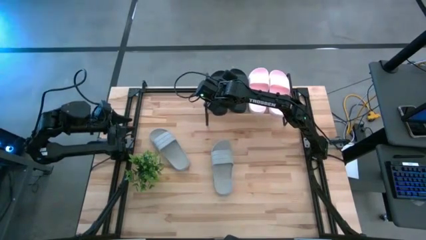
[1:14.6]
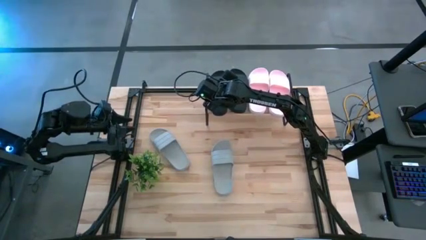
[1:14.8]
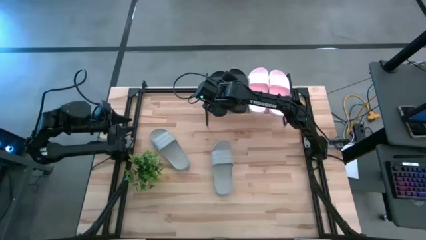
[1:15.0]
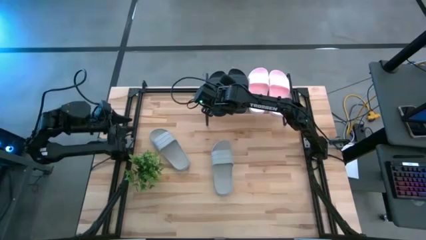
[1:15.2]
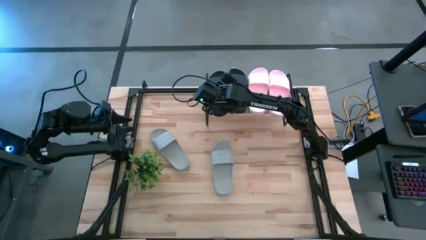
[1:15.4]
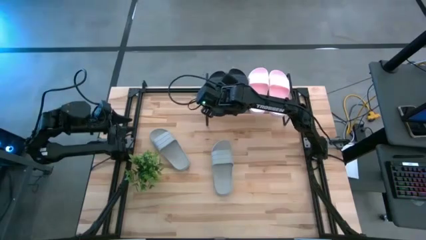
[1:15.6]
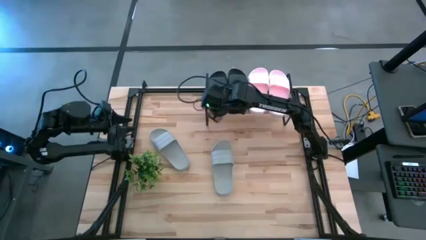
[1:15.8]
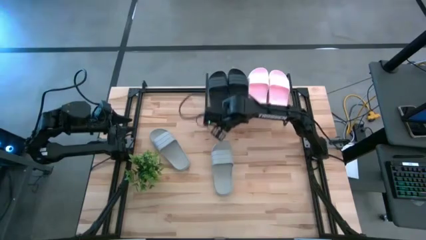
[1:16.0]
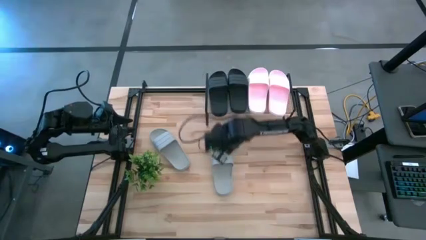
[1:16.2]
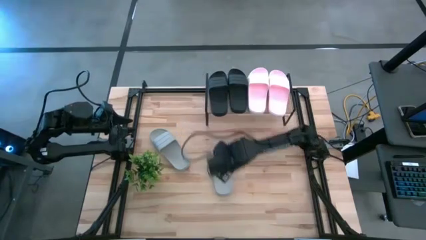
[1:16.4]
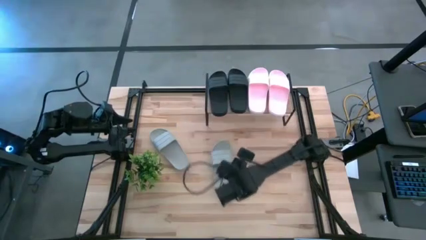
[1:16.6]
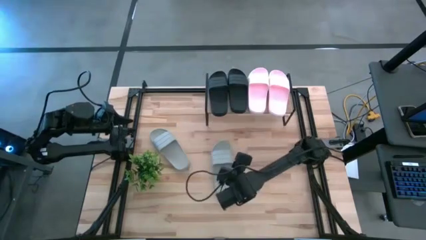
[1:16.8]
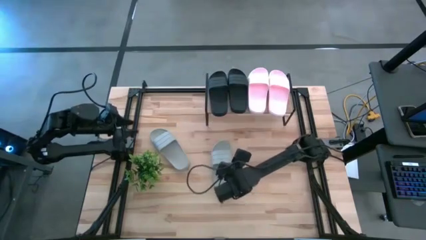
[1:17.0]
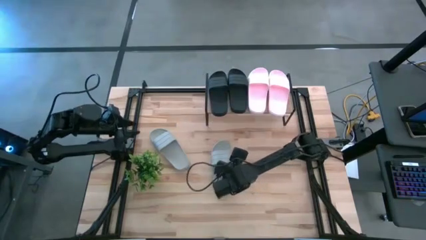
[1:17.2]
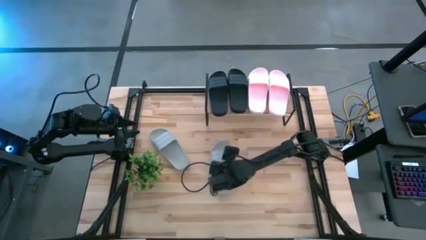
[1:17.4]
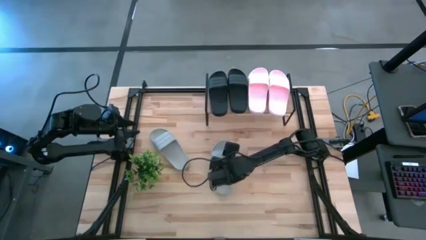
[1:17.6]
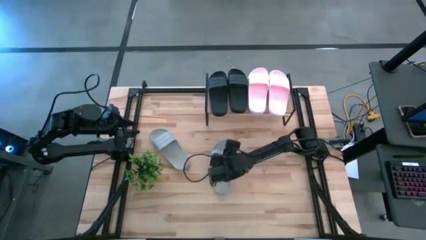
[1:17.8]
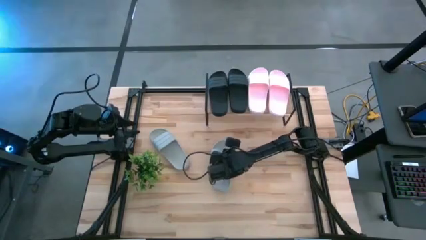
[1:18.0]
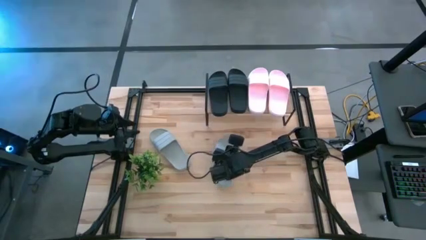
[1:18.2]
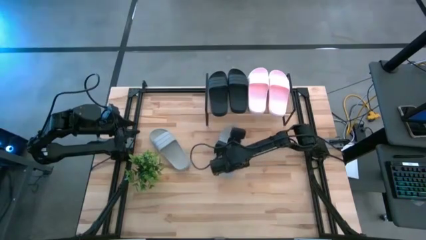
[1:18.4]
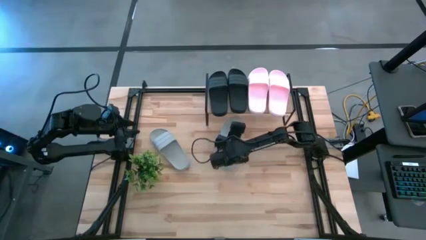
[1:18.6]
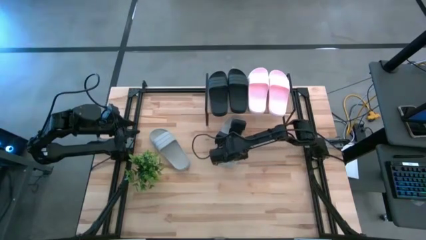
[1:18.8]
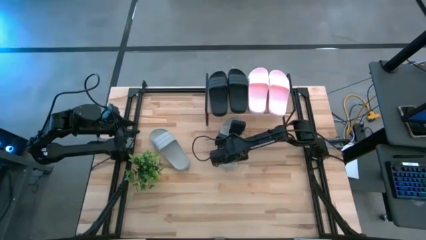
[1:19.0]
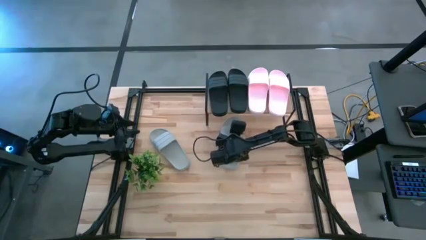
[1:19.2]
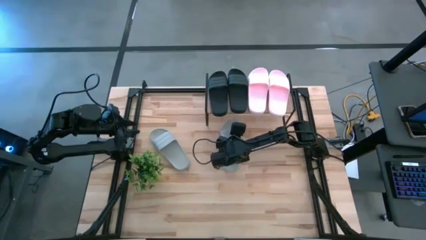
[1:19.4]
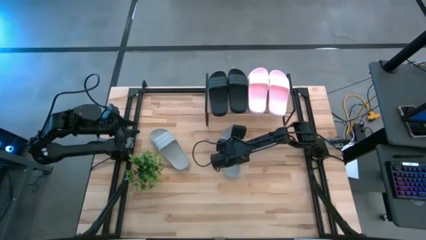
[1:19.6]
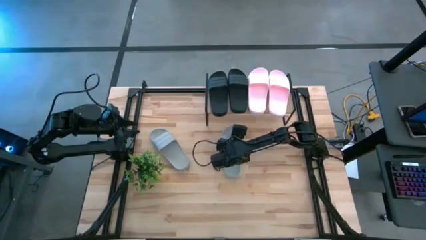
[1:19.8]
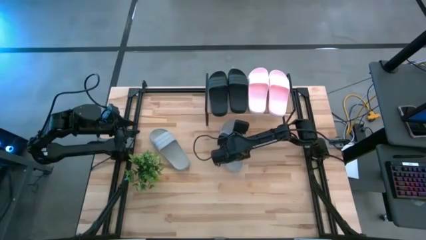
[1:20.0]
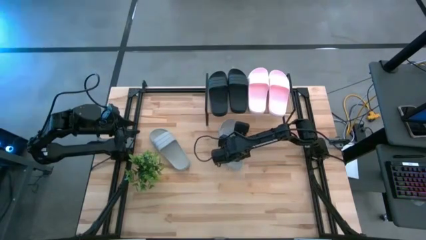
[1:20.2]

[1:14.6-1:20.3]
Task: Pick and place slides into the shelf
Move the right gray slide to the top center of the table

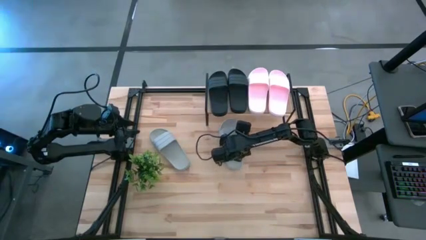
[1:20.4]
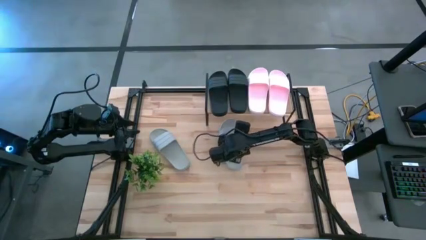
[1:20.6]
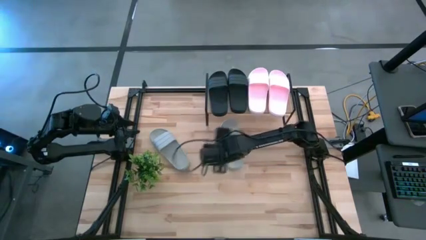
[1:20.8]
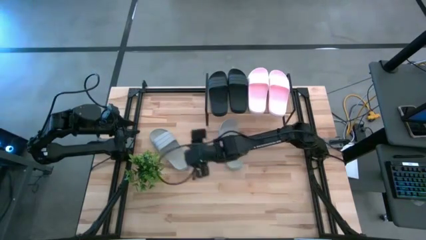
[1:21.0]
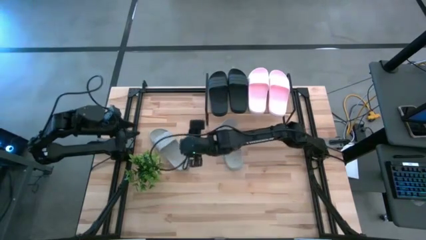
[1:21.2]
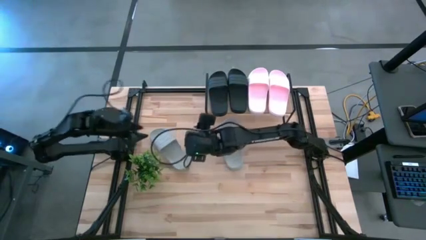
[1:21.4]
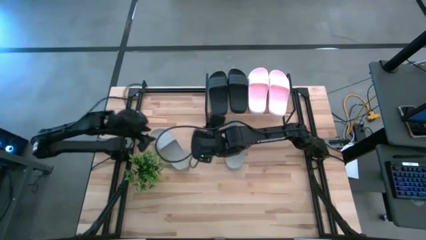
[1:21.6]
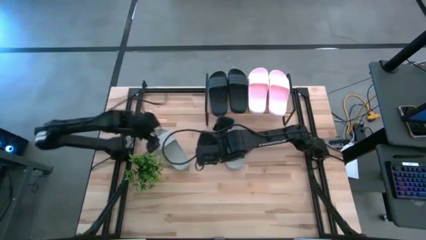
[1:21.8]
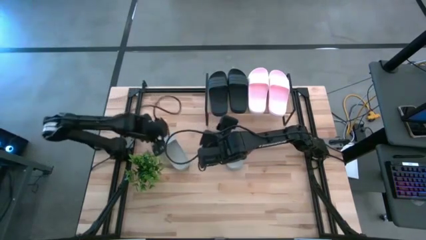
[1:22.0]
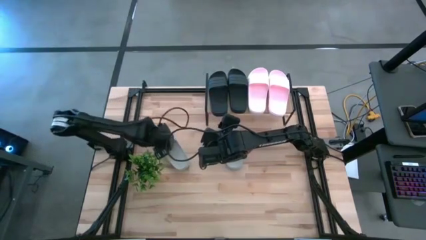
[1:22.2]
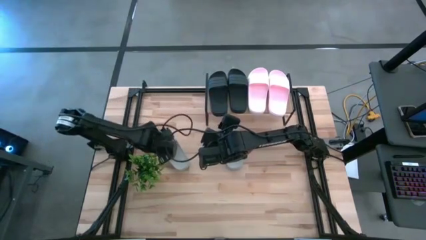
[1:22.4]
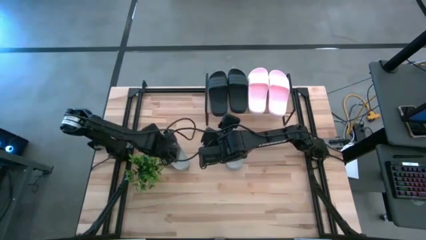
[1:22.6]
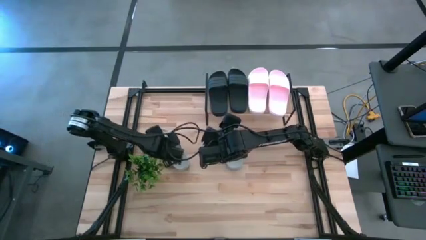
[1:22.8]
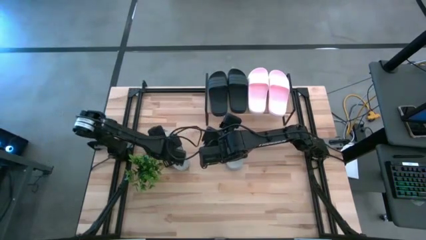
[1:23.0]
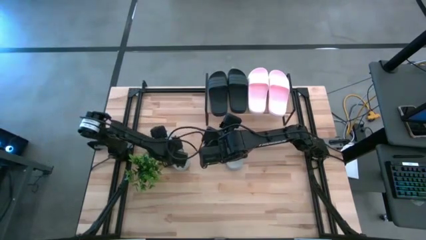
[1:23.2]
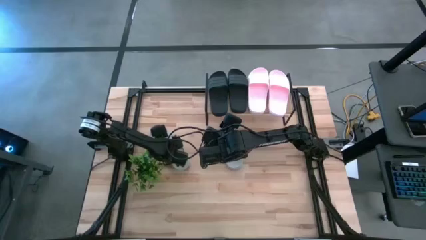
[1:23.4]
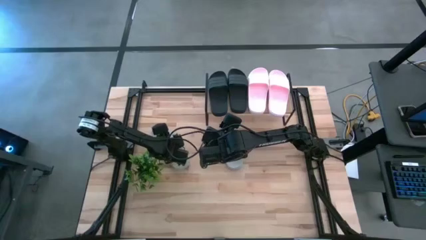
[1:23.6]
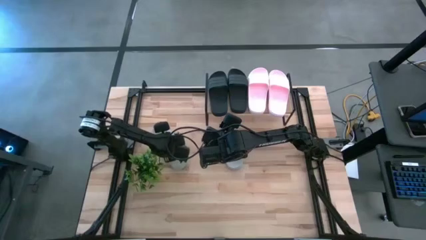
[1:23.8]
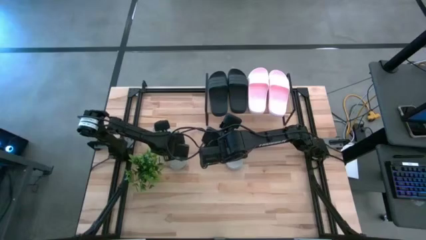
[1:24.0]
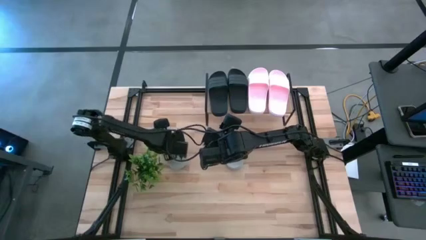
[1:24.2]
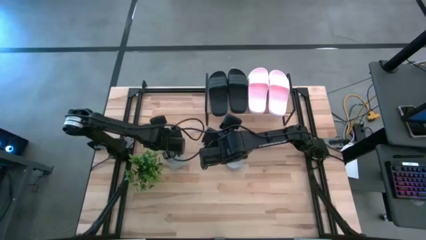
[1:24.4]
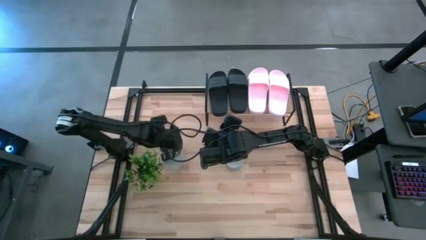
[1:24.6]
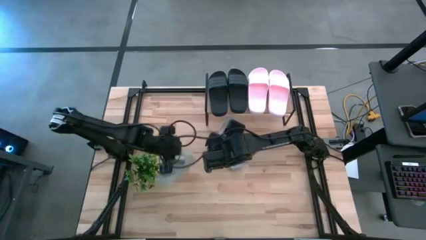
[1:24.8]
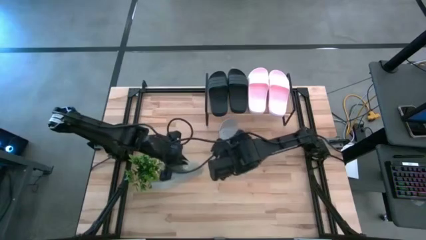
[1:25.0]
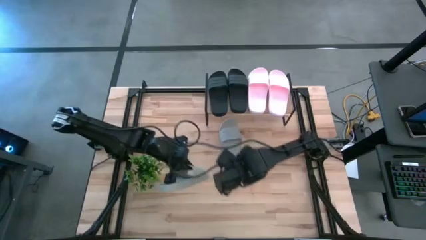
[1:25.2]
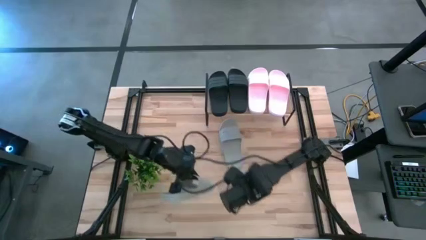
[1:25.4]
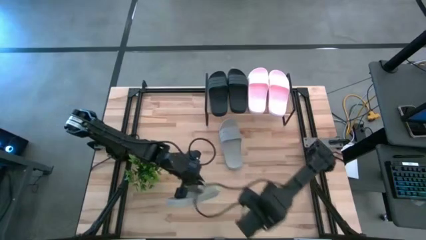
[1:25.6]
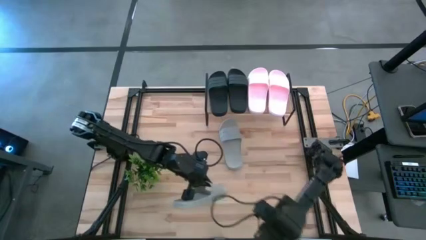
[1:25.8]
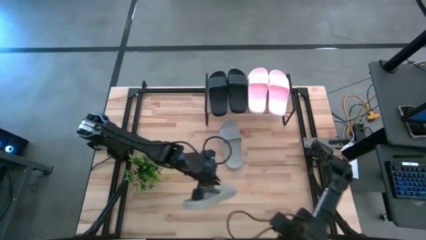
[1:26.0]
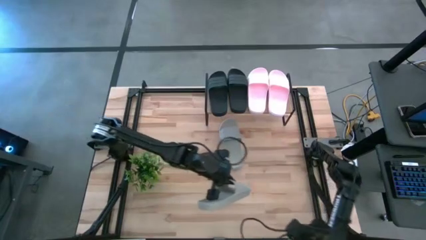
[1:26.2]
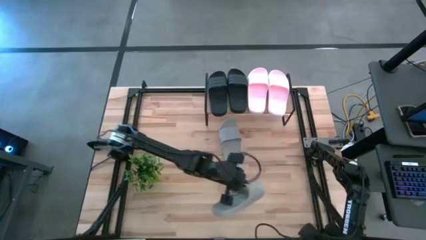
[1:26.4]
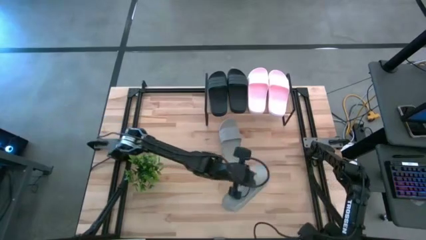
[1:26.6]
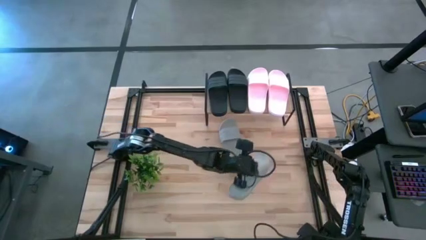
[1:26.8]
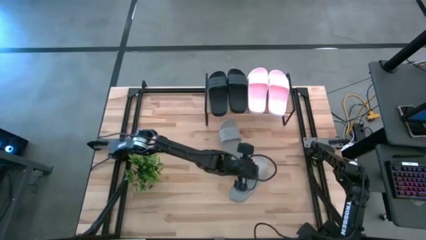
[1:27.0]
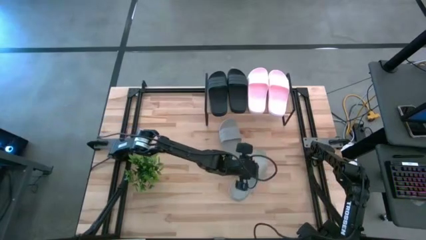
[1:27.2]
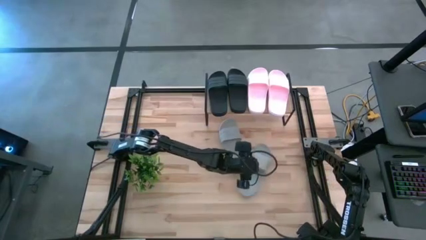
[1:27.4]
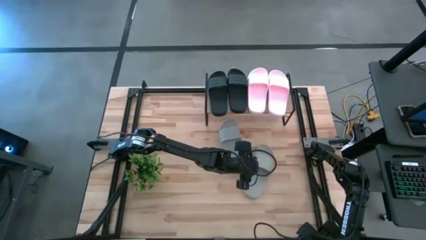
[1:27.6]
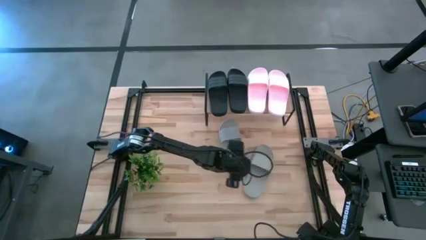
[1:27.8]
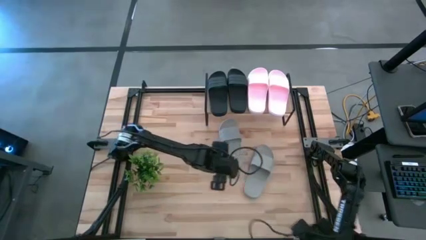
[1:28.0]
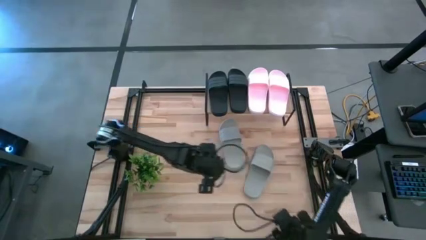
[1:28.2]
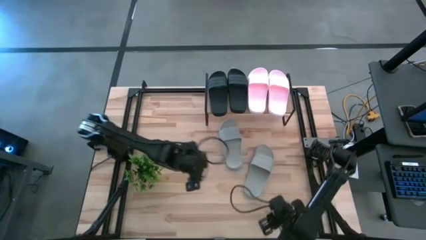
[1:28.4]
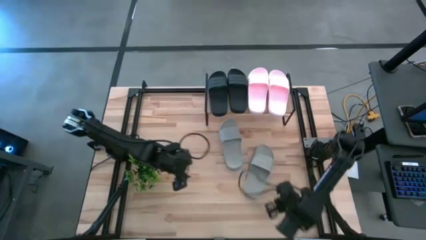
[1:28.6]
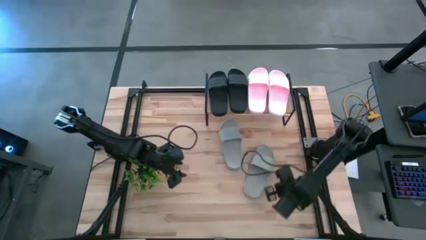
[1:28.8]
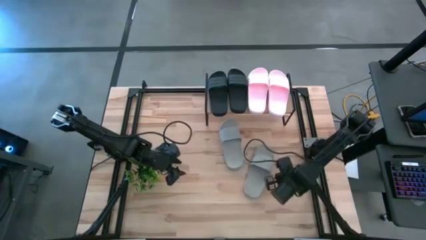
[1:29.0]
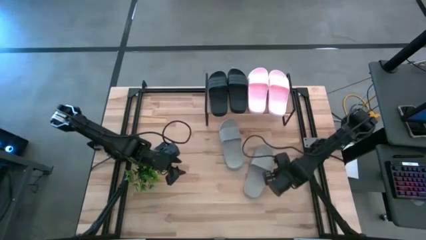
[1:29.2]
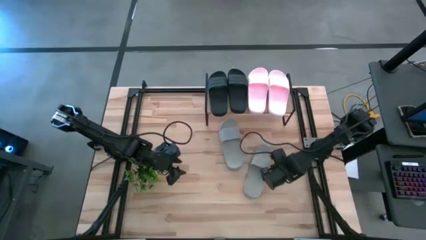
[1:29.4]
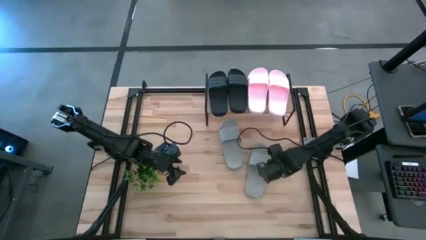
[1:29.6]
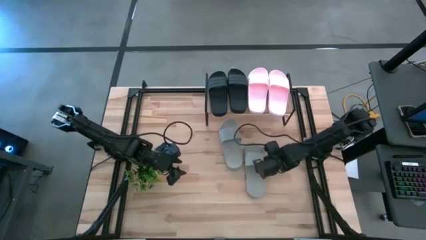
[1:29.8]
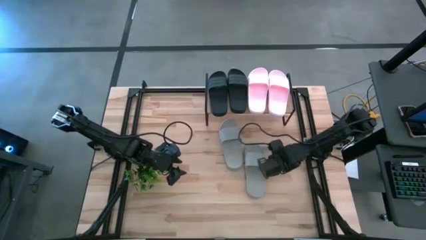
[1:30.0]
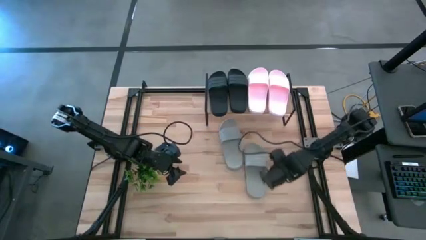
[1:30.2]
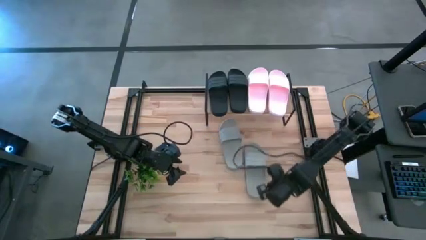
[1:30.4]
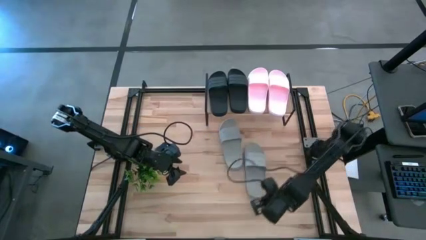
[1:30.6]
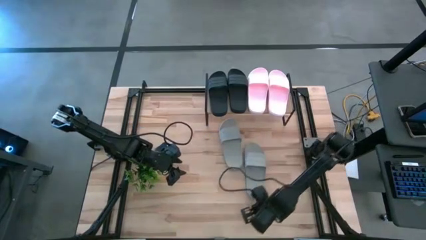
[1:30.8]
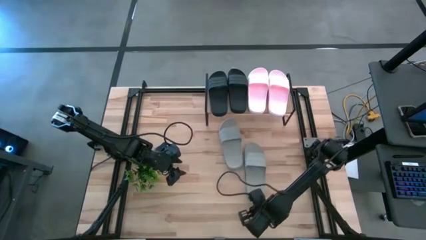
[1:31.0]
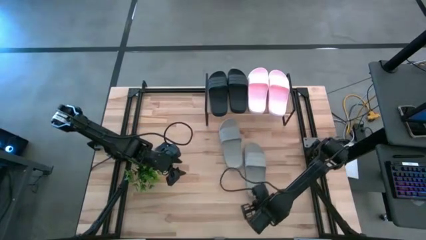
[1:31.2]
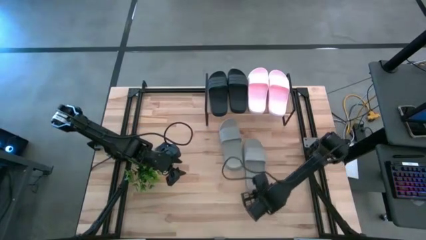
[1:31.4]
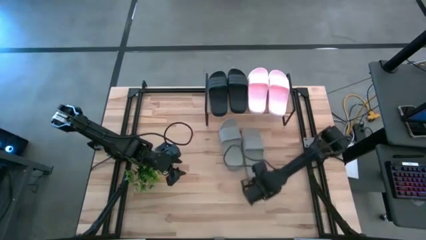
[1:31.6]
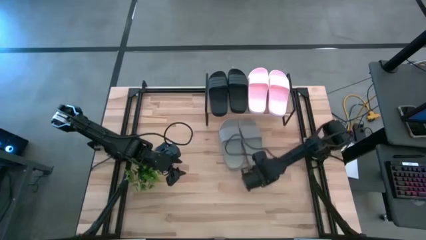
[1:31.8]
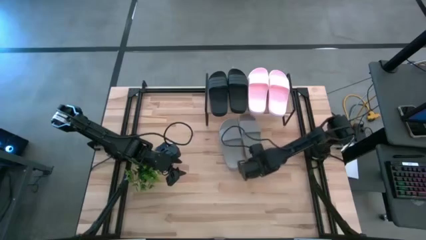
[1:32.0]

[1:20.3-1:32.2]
Move the left gray slide to the top right of the table
